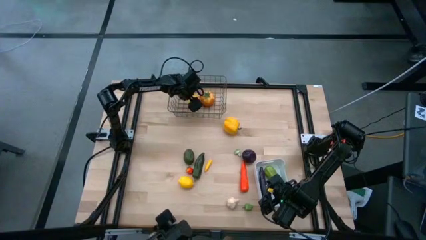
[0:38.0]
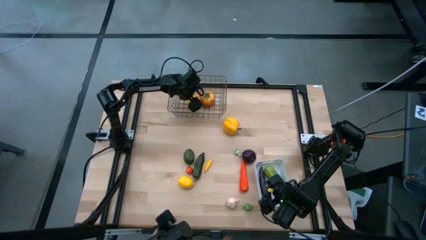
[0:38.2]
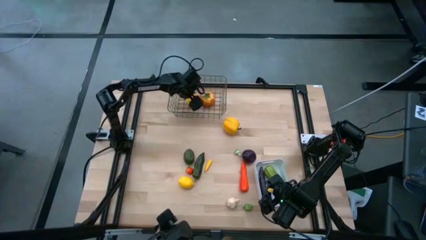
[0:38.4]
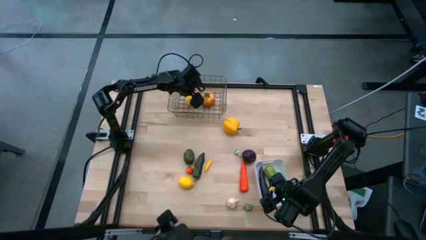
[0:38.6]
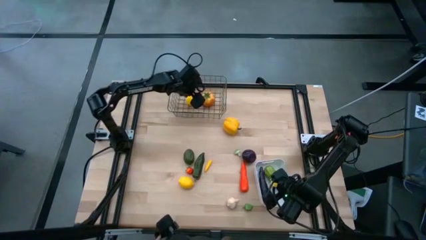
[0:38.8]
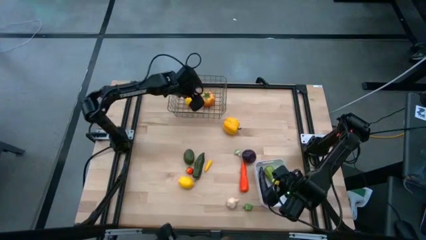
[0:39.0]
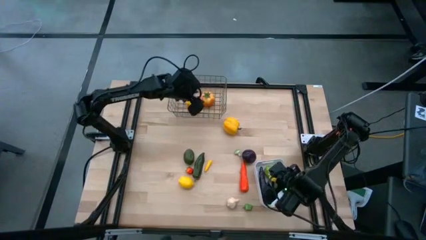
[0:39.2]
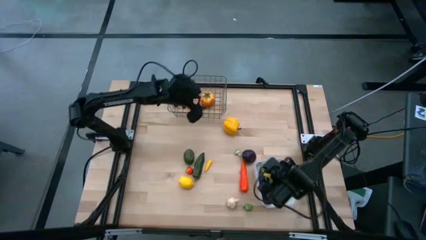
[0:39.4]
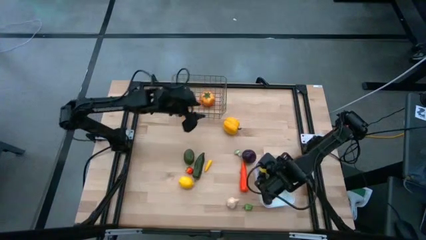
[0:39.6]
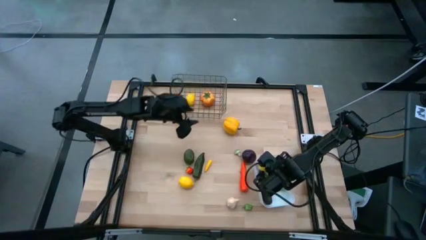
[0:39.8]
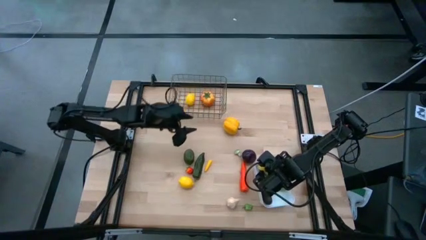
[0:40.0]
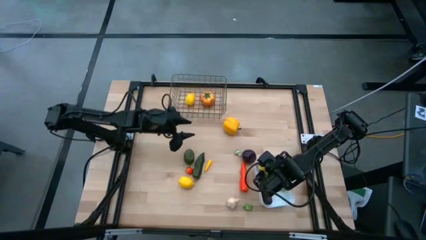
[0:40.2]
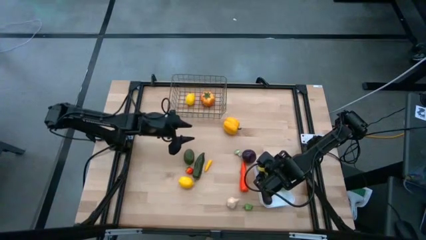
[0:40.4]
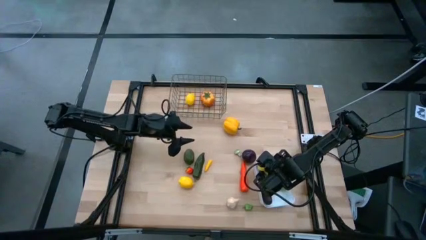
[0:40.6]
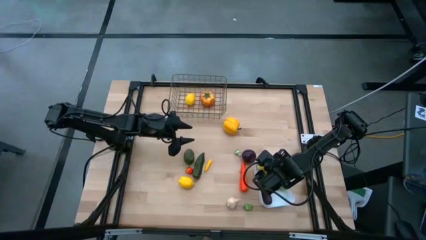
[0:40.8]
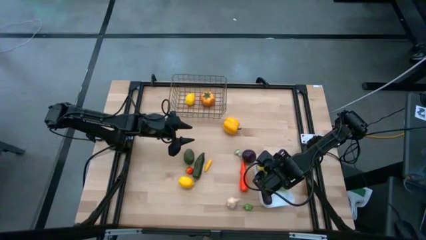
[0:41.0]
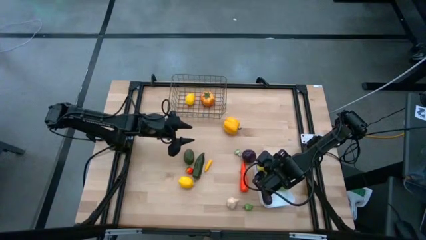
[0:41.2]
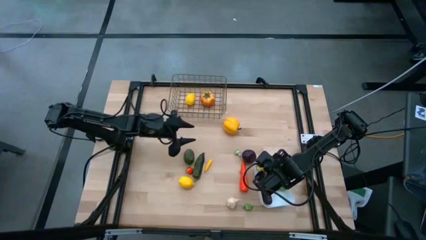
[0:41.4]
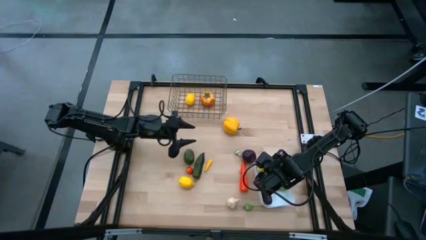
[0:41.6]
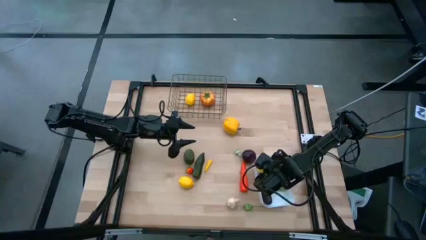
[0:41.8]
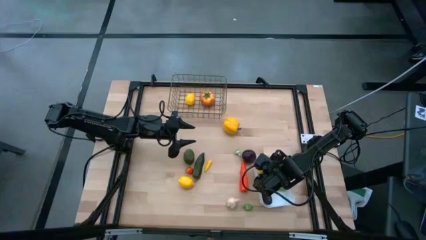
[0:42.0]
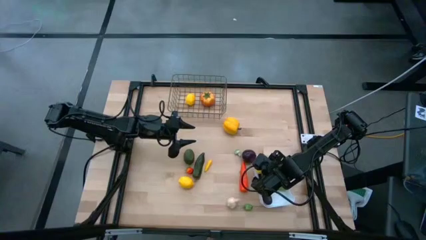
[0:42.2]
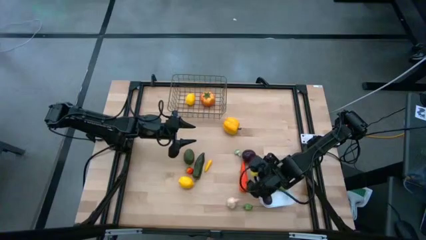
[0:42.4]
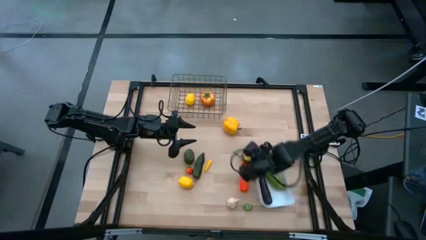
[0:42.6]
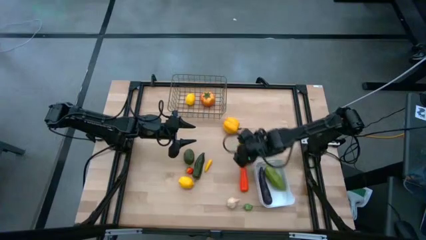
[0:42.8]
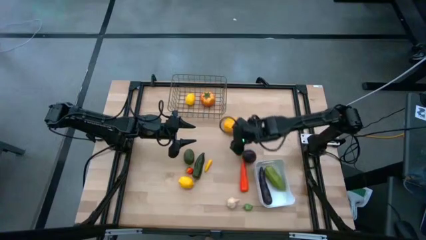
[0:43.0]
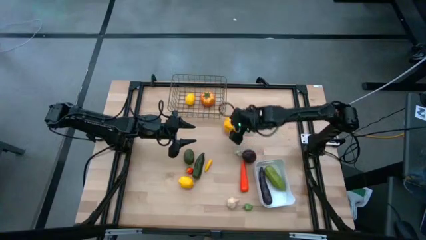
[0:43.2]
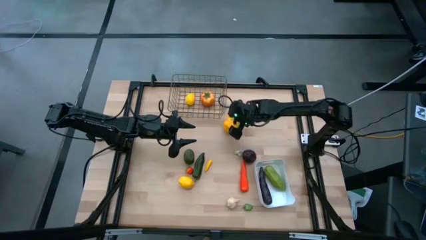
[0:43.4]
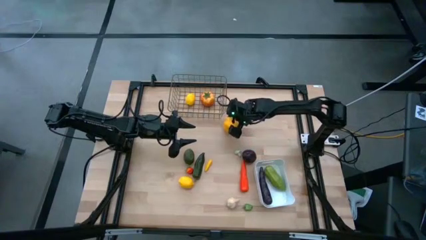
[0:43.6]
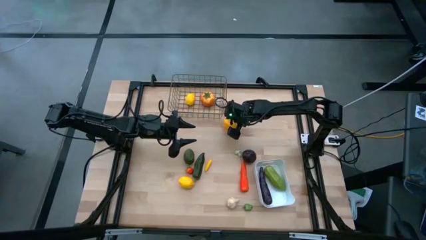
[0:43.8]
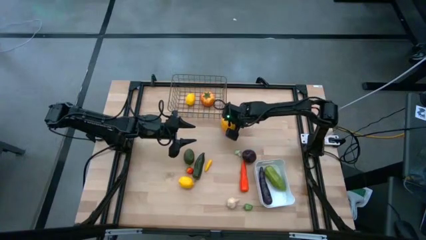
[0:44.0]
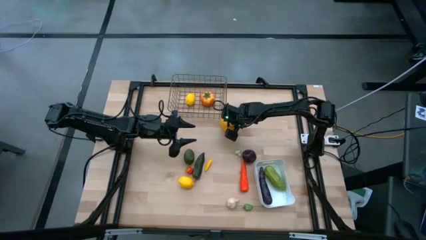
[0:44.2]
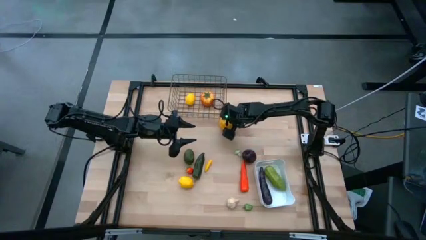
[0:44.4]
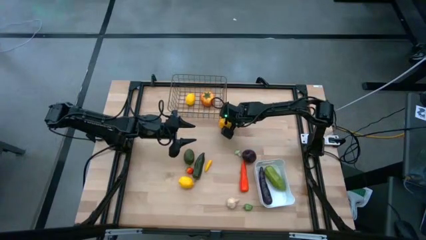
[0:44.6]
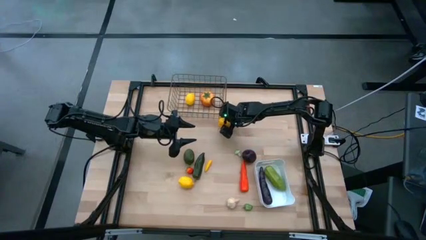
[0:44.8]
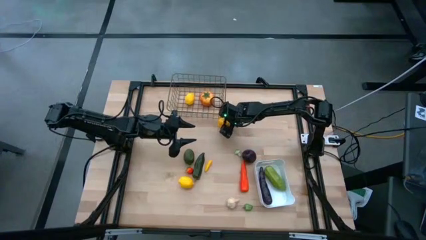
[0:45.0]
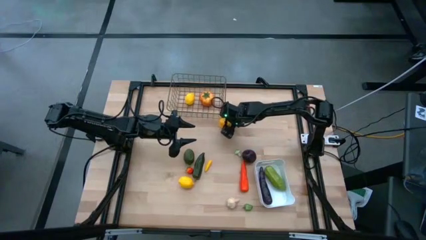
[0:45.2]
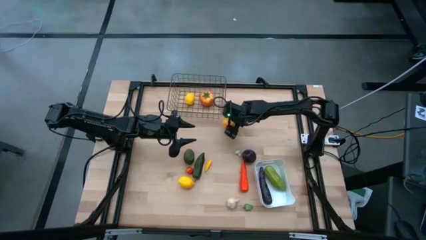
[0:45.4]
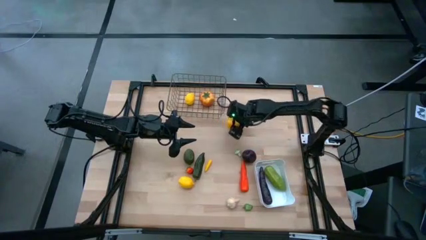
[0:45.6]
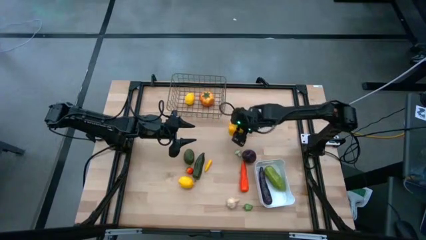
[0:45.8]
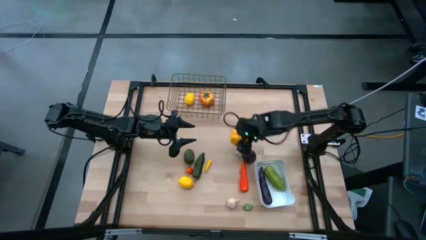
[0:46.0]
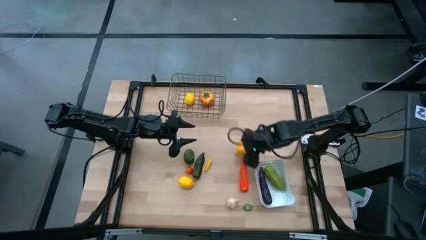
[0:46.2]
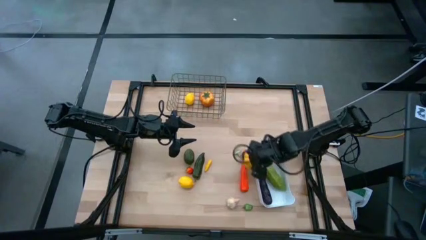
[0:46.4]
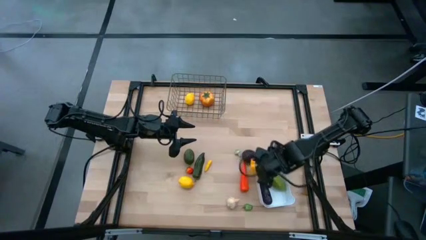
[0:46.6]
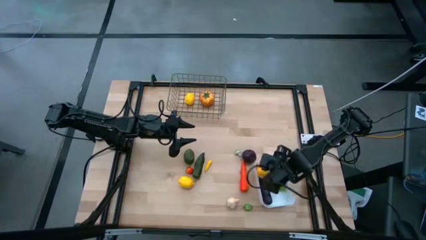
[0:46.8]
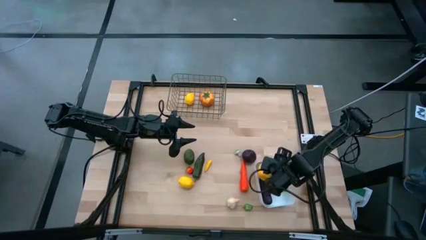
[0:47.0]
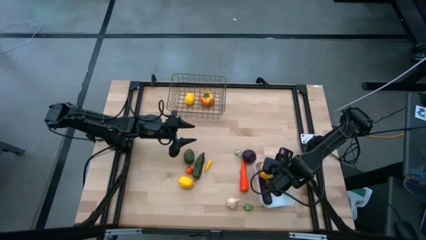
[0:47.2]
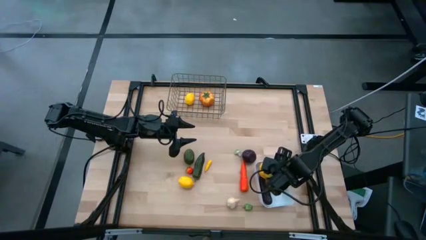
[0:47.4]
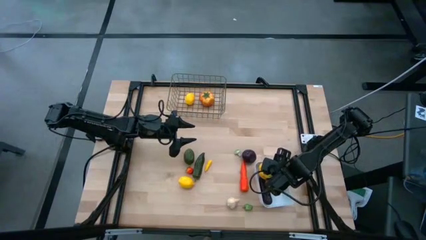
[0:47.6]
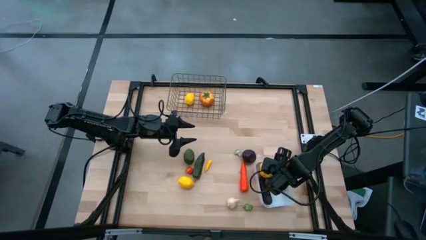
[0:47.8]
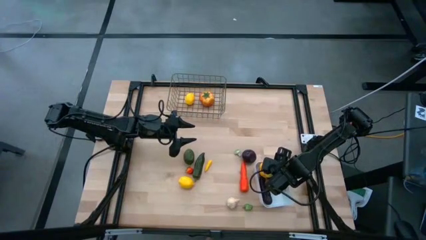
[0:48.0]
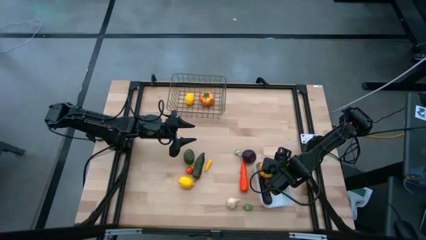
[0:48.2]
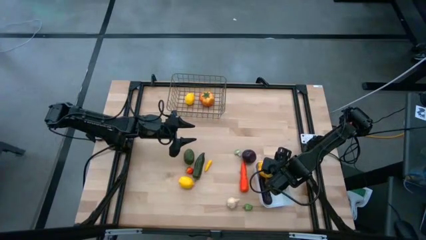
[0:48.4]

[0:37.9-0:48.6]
Task: Sort produce into baskets
Put the yellow bell pepper into the white bin

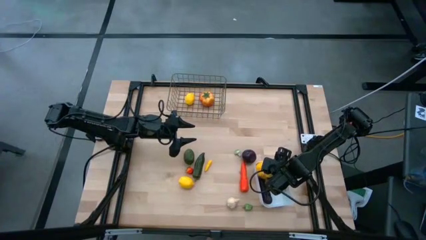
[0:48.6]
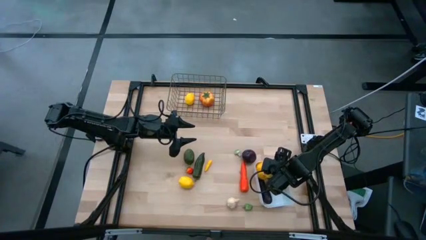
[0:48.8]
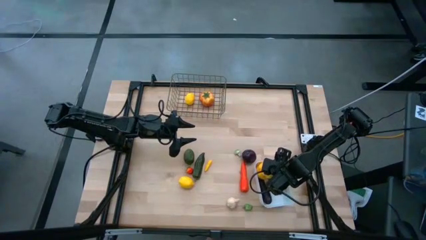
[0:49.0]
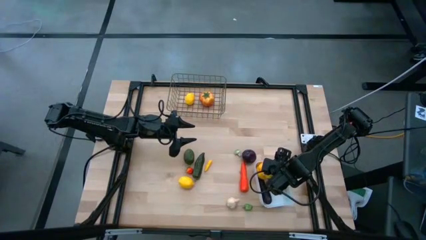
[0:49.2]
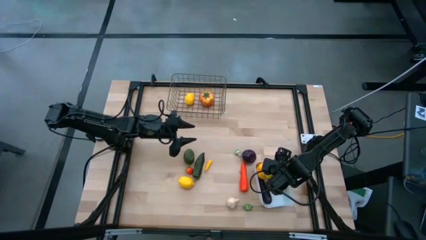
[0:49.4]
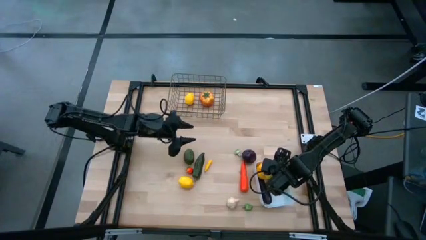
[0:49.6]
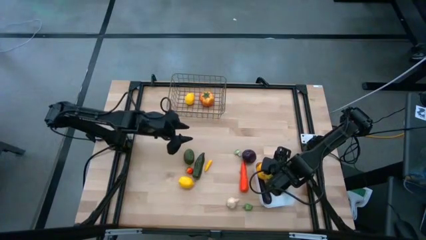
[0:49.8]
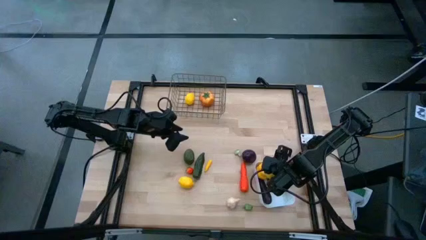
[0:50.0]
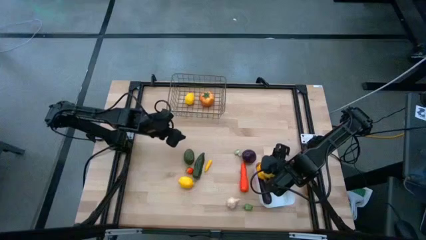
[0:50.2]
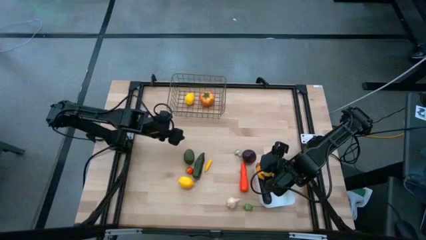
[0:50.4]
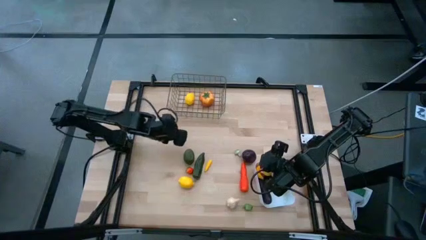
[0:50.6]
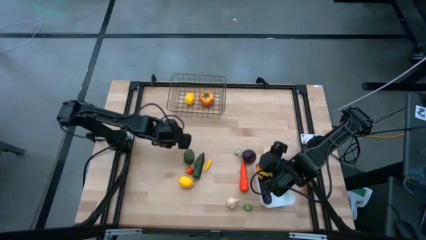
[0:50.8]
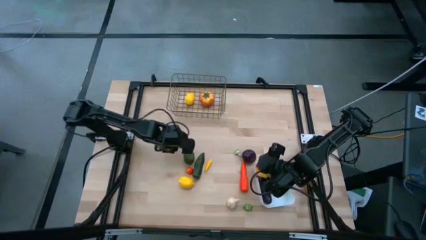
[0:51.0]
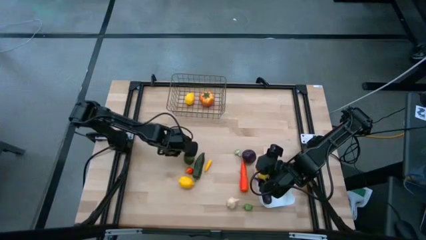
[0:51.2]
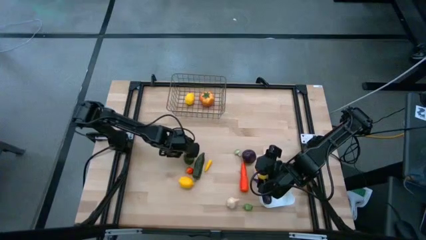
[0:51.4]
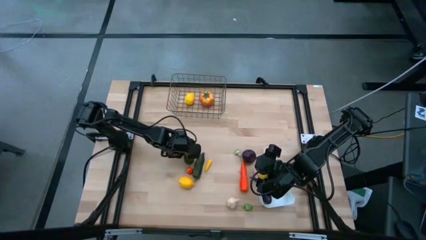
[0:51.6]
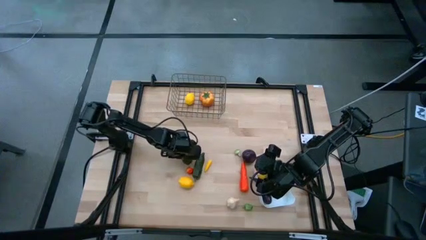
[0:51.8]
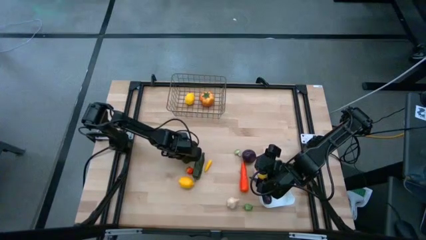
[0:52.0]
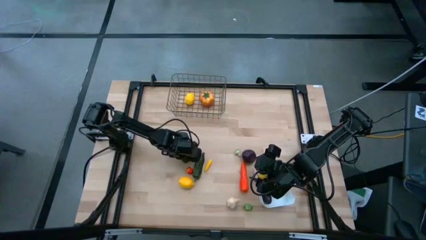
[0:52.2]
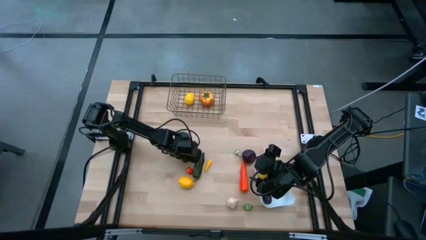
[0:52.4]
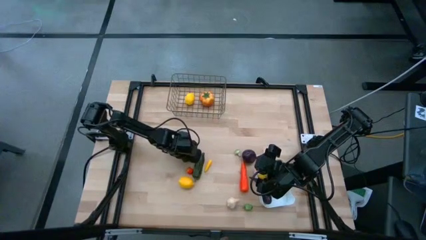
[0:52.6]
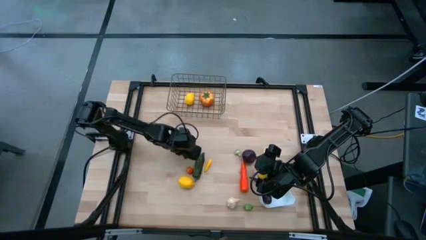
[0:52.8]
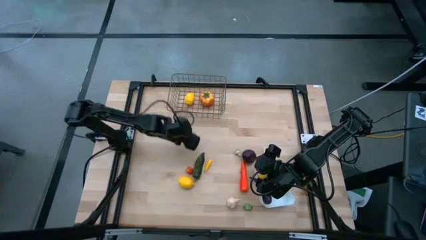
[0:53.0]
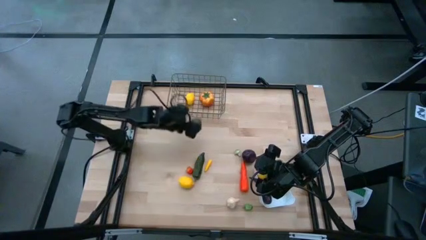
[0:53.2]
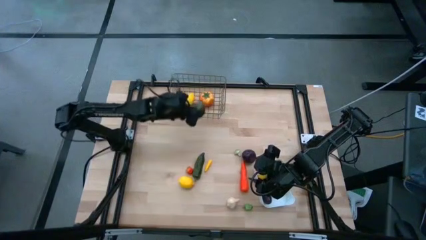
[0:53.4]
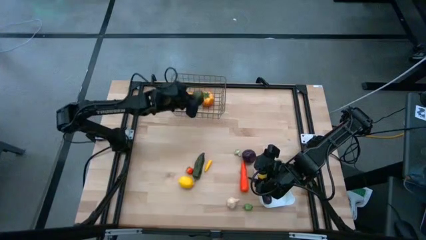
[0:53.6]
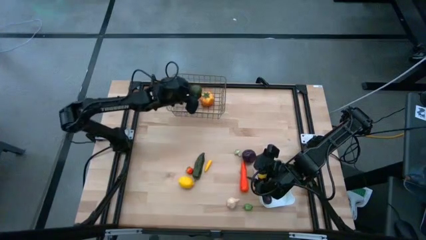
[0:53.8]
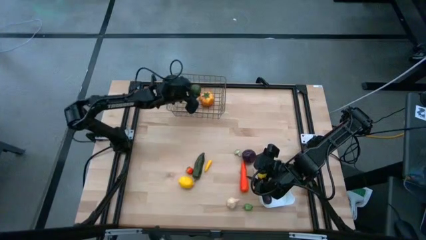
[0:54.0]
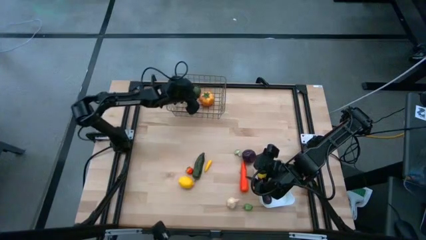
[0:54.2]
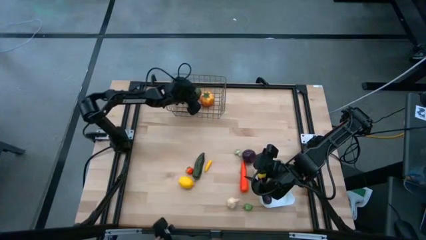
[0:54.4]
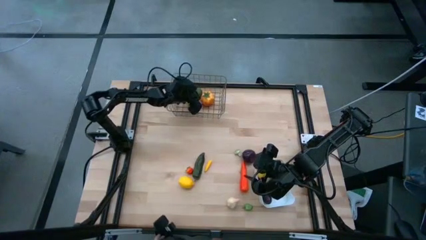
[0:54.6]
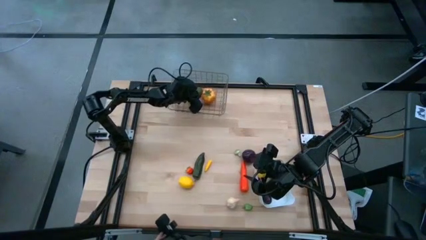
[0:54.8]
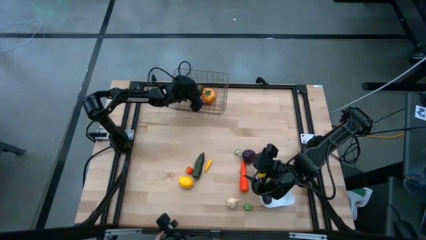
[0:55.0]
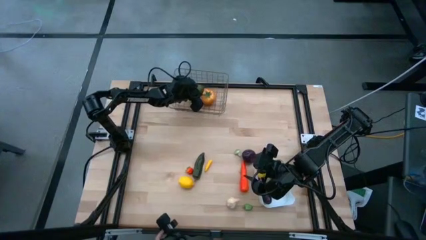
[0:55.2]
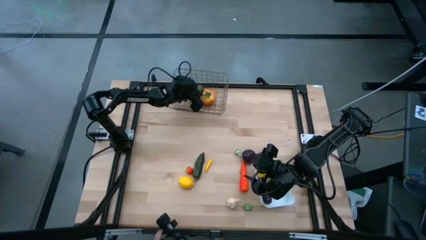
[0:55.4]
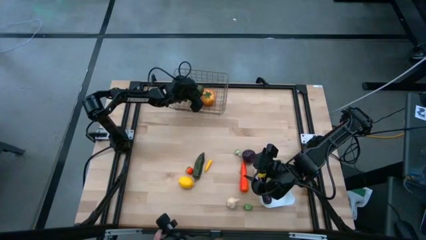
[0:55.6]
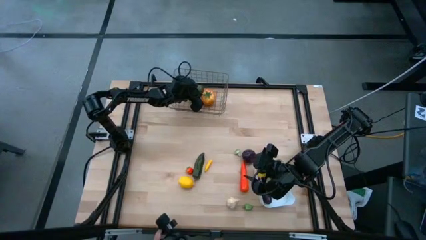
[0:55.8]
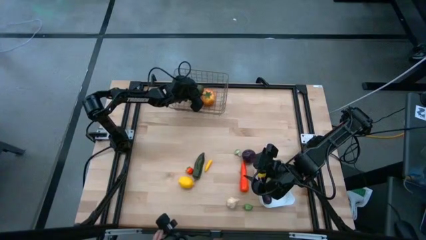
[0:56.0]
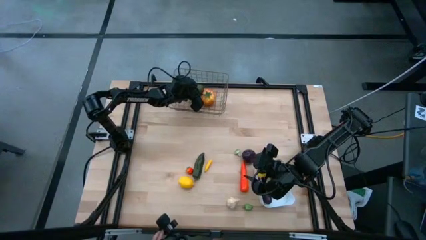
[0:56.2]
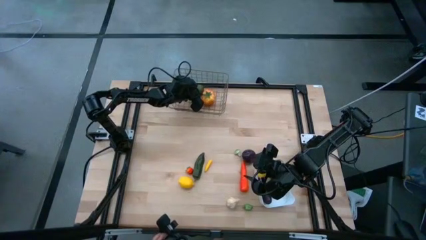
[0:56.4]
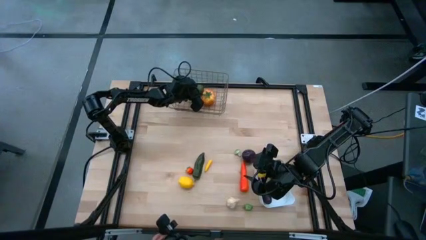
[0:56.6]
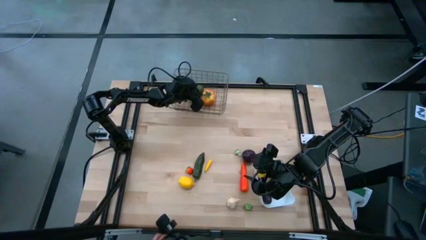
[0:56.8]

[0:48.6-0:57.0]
Put the lime into the mesh basket
